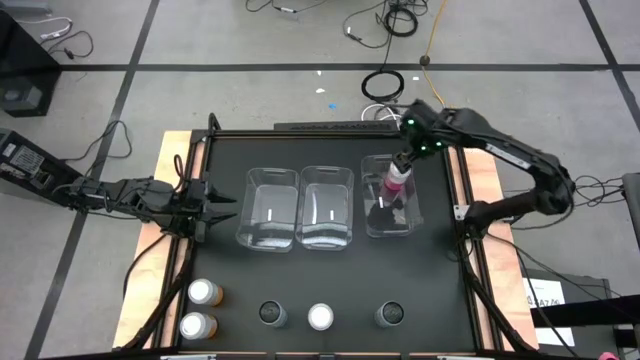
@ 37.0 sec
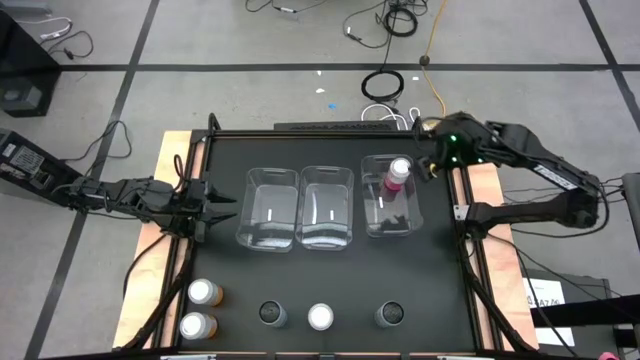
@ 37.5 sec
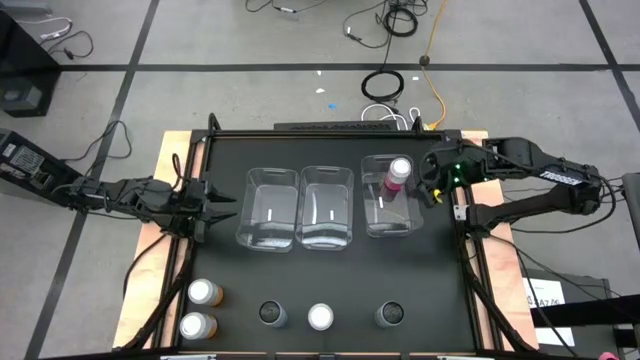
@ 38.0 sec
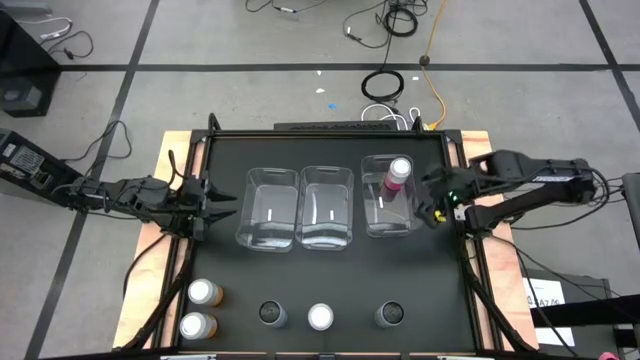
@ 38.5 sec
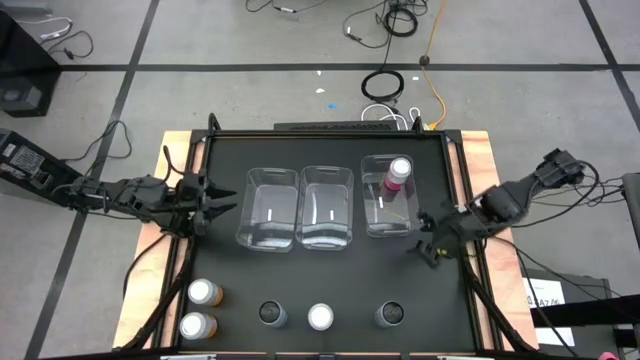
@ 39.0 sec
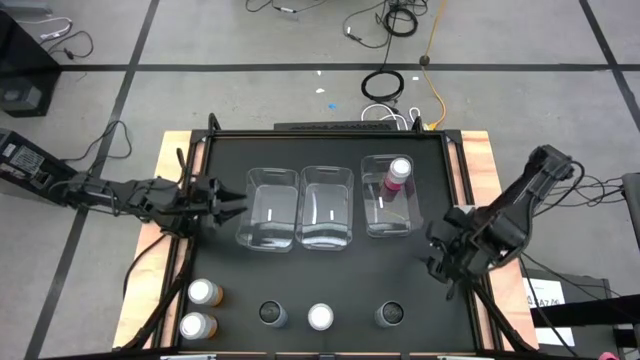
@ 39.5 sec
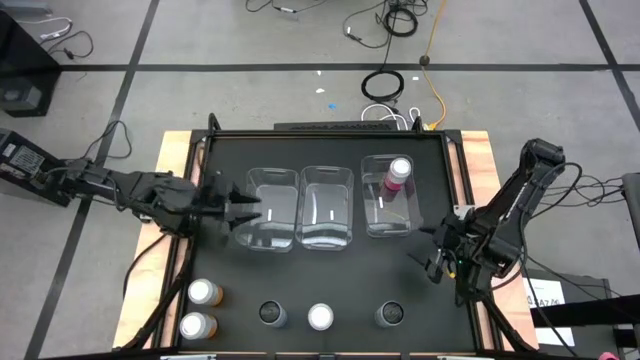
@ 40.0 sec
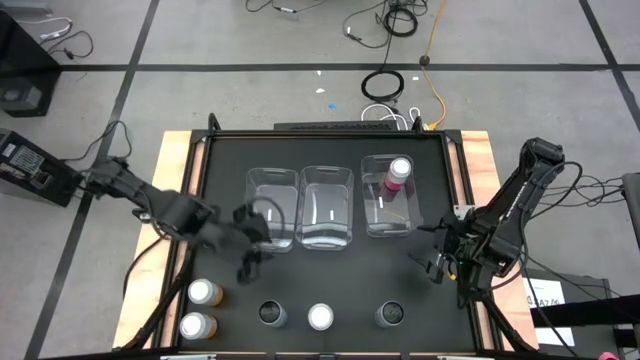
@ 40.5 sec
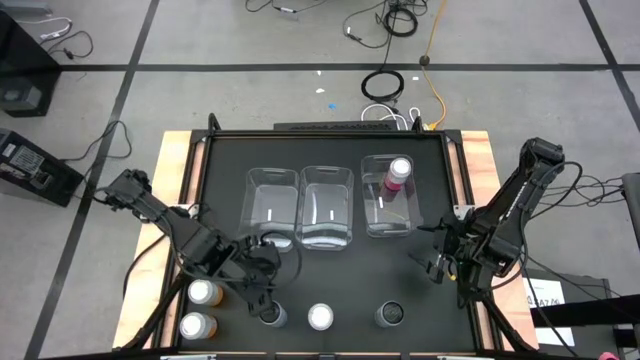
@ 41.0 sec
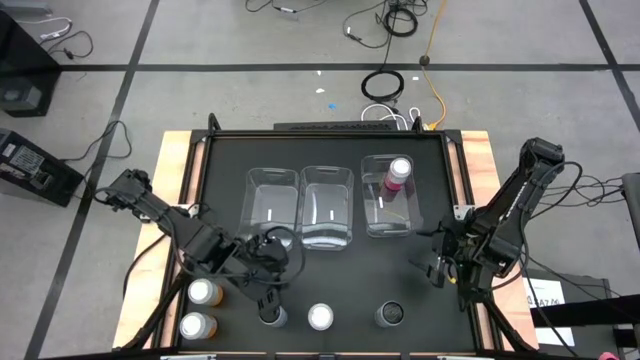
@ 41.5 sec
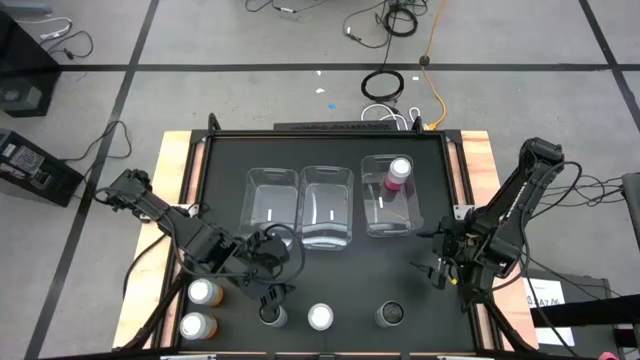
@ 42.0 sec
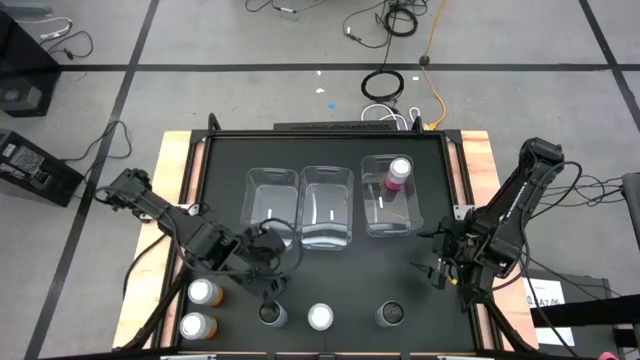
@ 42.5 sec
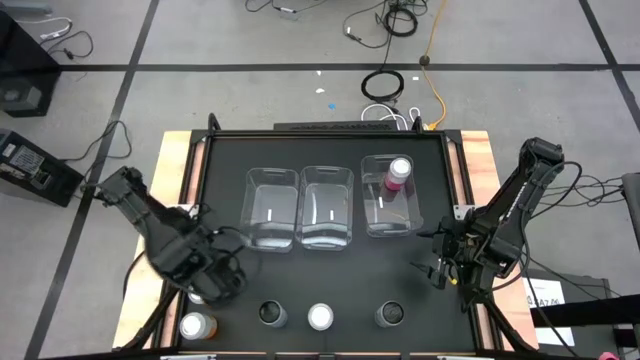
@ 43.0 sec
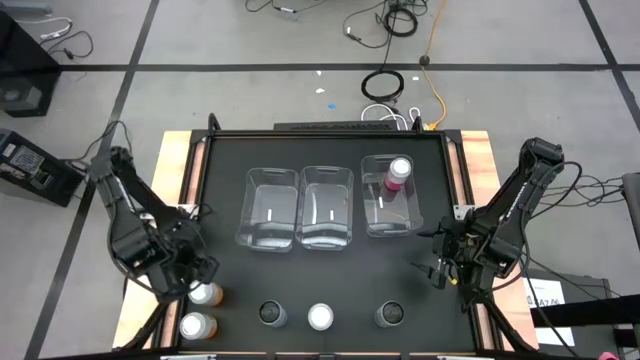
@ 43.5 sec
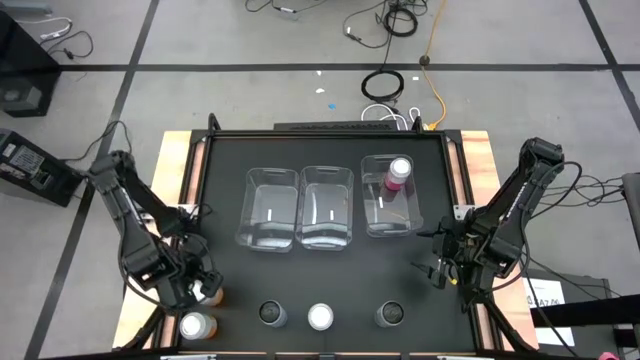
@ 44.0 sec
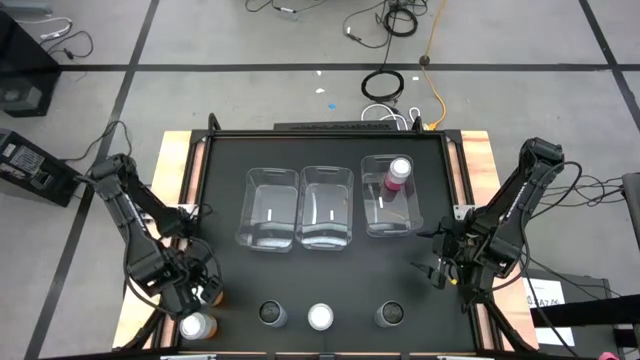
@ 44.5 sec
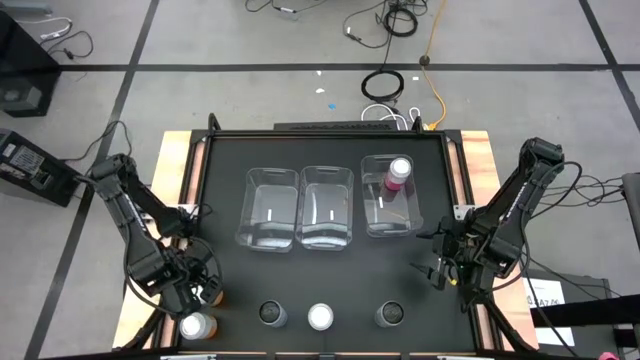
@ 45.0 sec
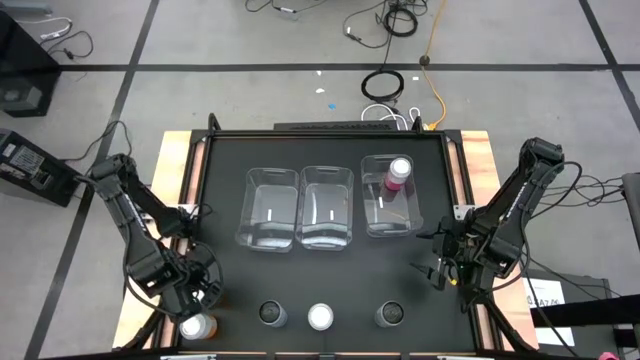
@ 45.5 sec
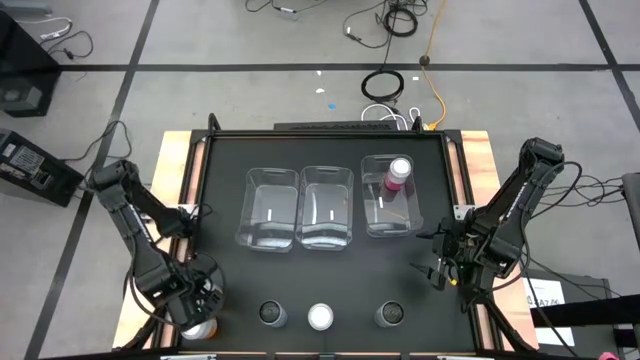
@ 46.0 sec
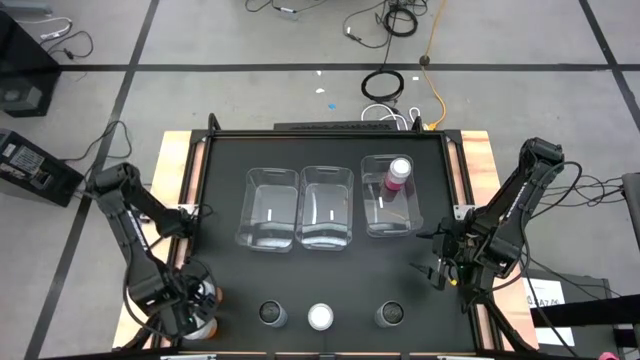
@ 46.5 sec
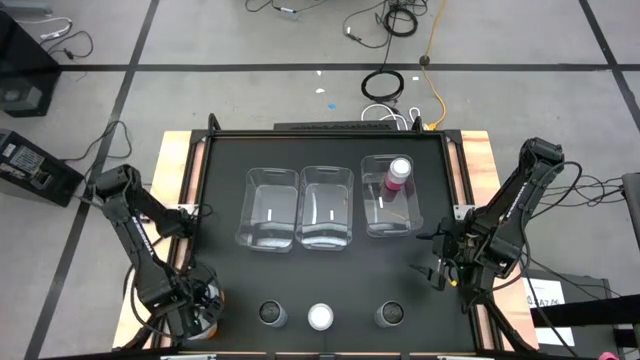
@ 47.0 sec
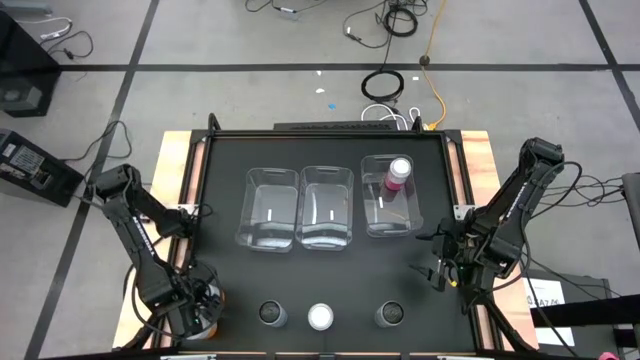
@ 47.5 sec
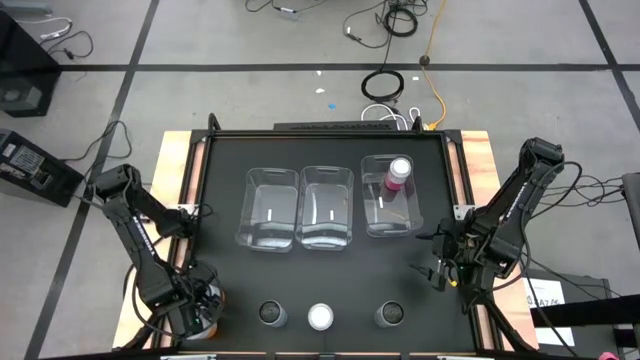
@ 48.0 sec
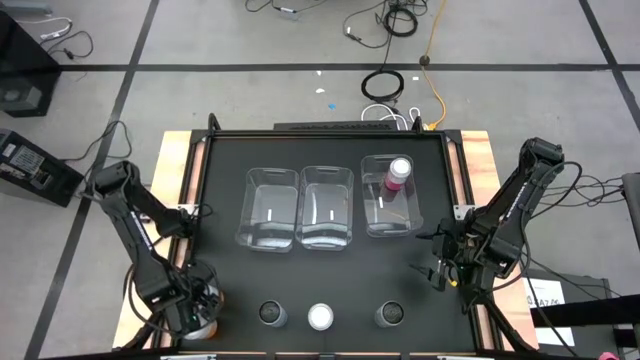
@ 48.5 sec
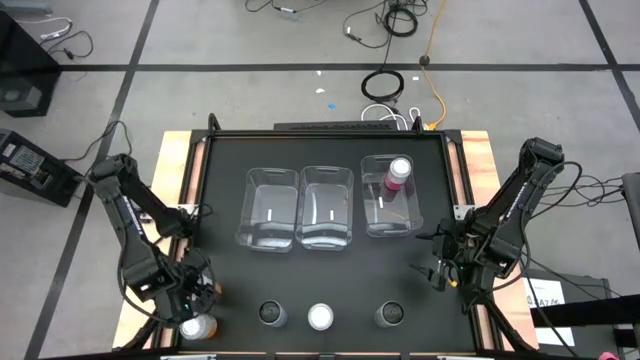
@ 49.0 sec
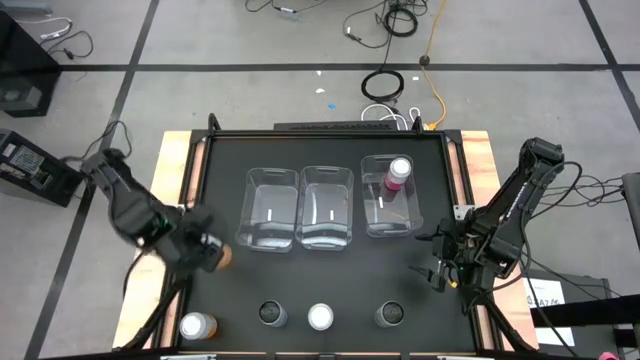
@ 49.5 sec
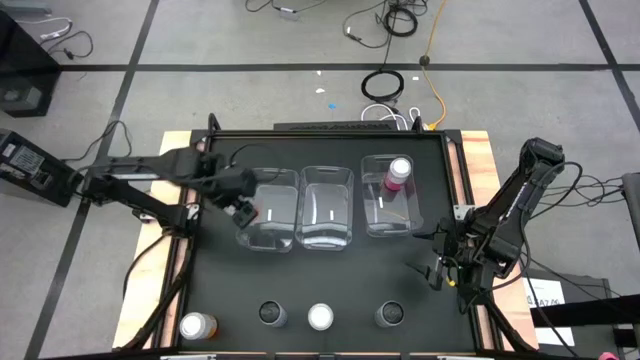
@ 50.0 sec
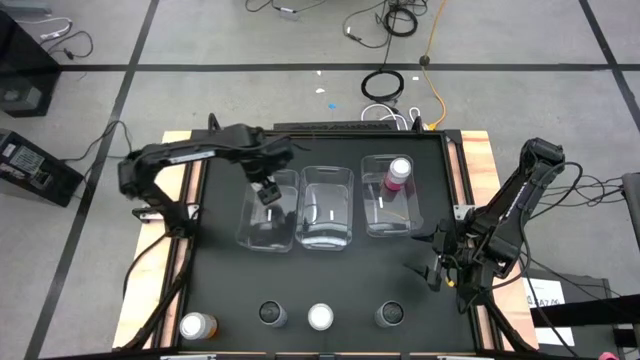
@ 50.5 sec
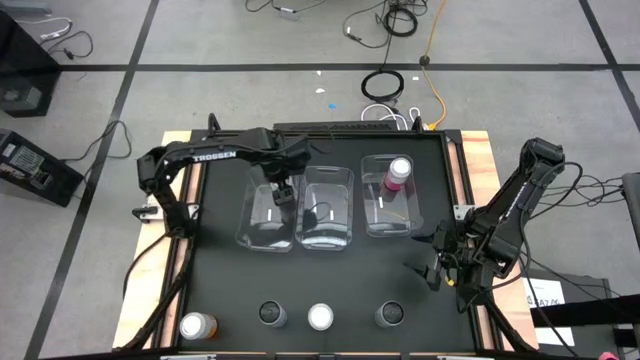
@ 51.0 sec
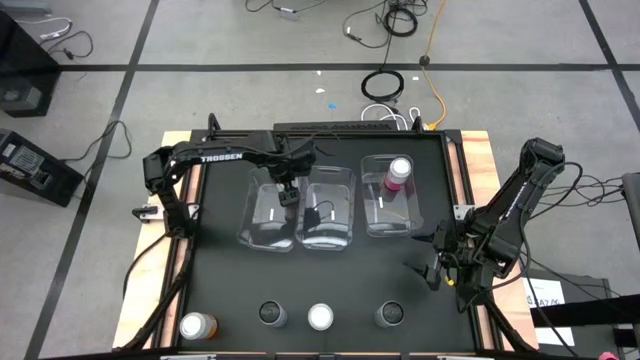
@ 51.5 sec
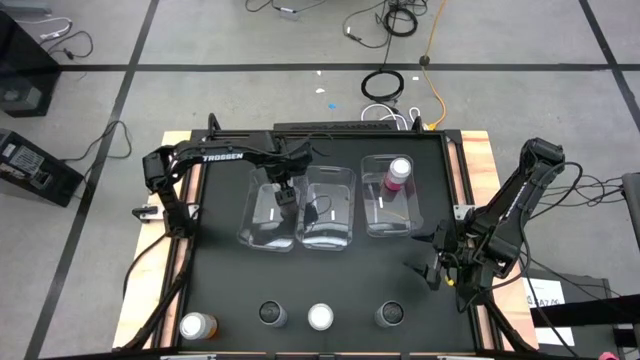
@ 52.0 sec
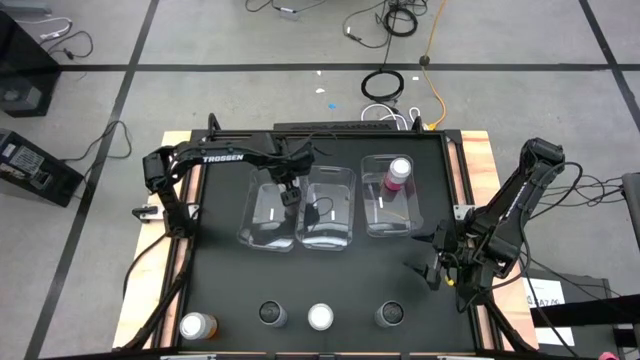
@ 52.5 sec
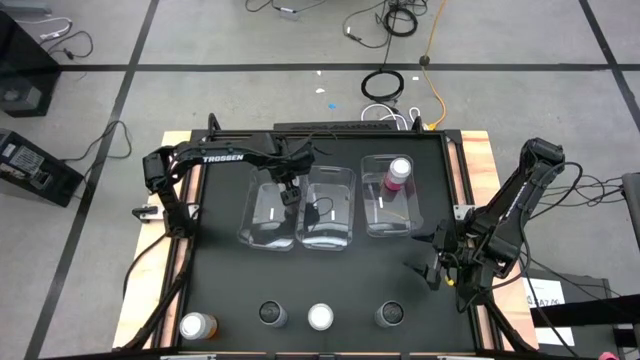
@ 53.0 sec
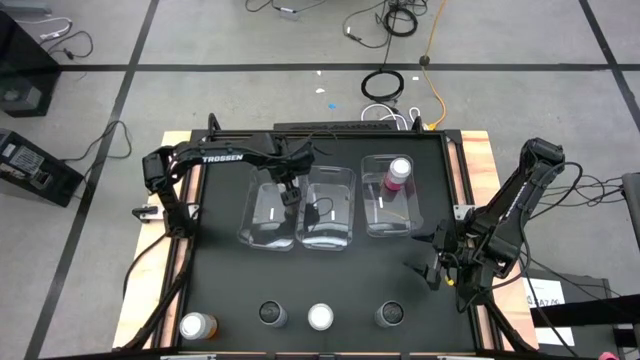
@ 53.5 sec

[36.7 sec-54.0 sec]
Task: Sort soda cans
Put the top orange/white soda can into the left transparent bin
